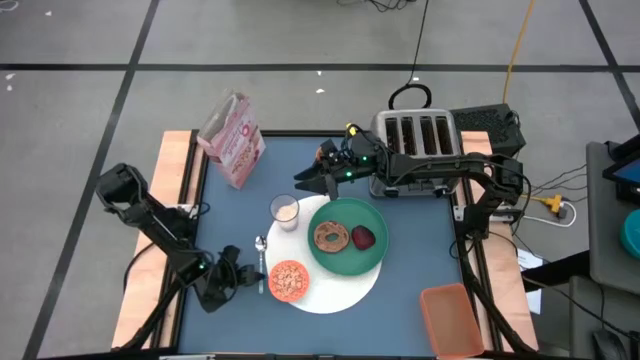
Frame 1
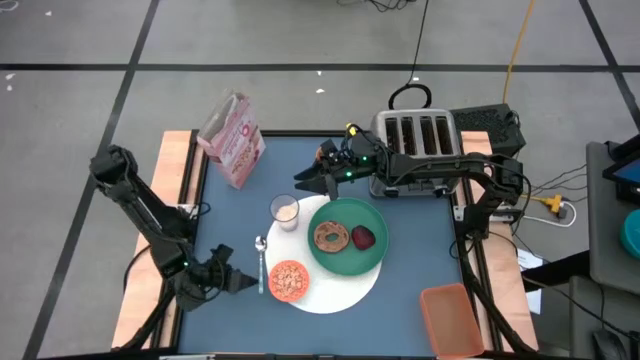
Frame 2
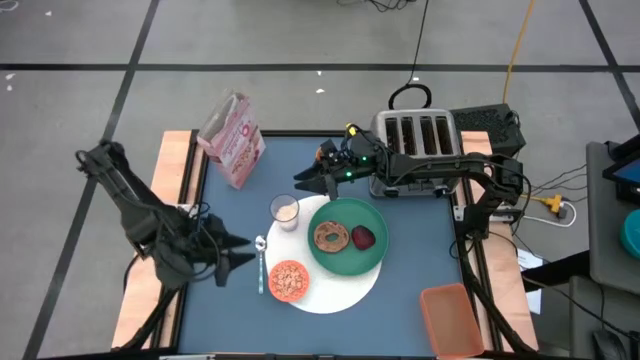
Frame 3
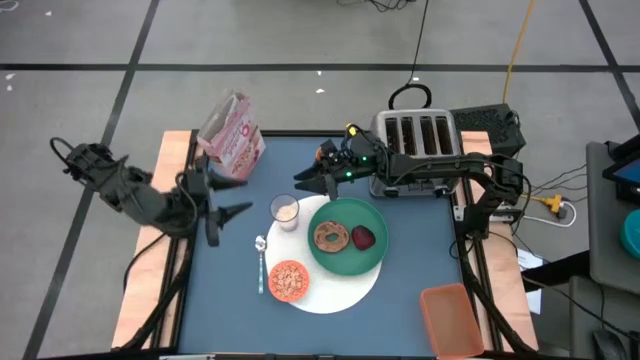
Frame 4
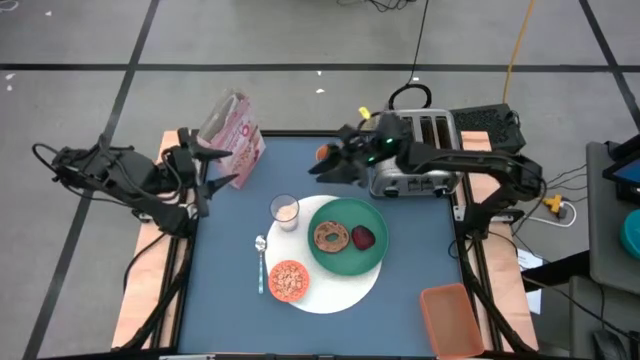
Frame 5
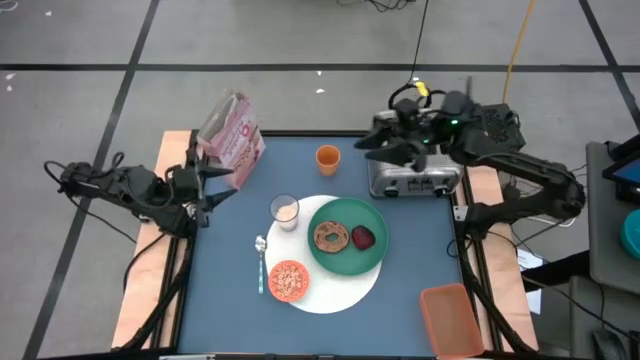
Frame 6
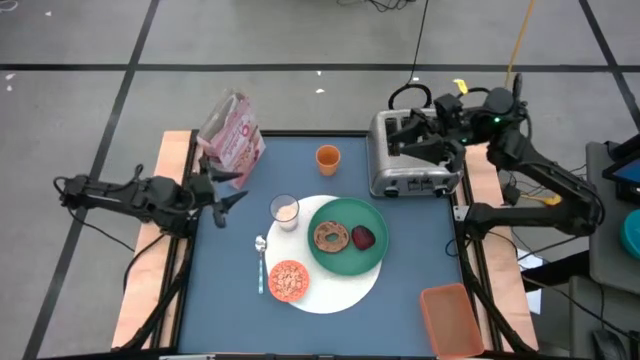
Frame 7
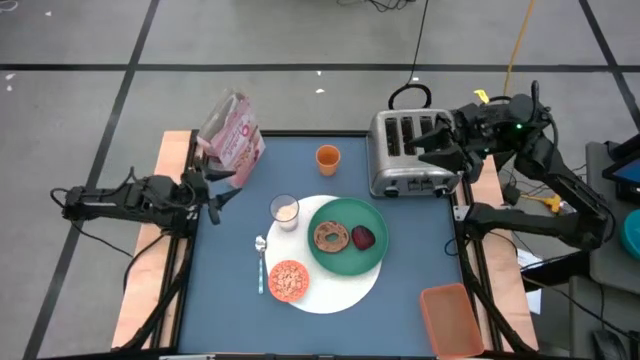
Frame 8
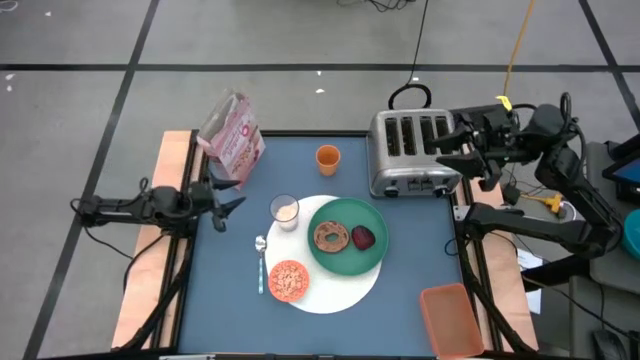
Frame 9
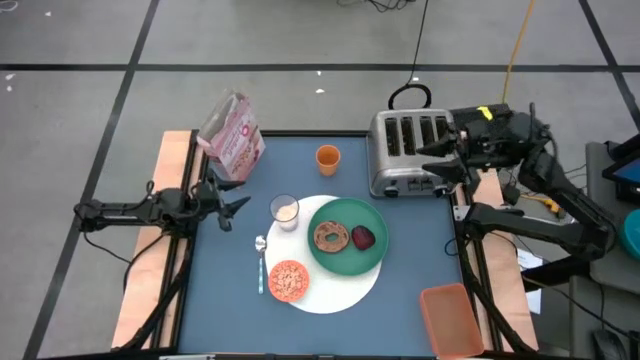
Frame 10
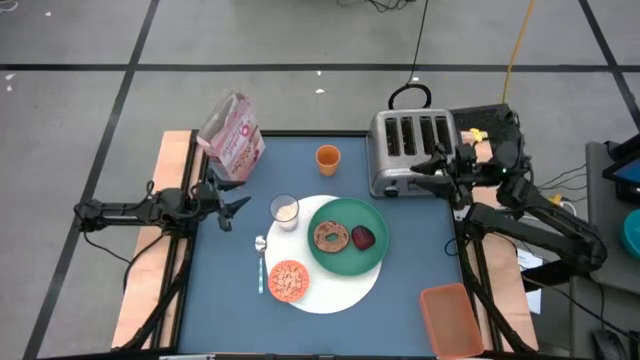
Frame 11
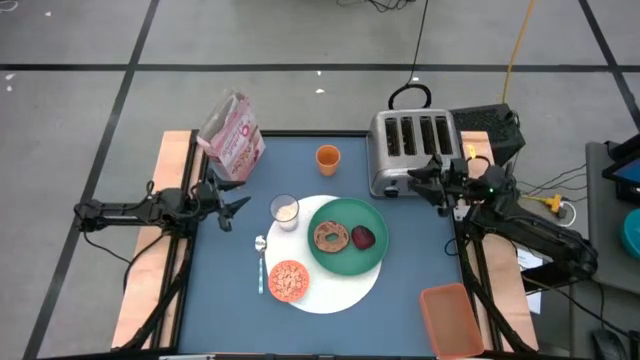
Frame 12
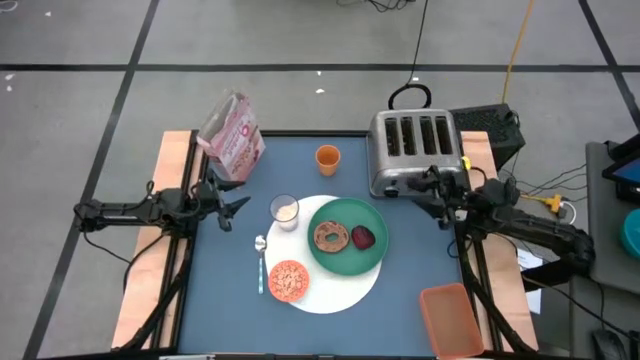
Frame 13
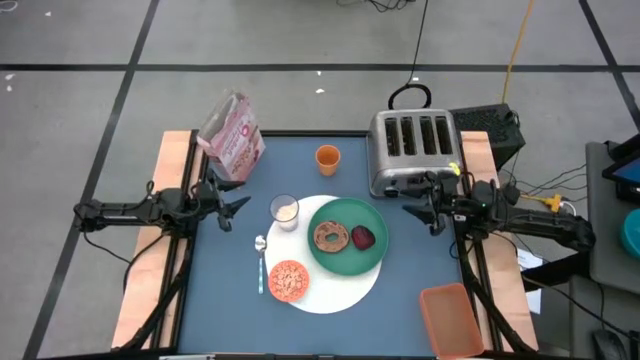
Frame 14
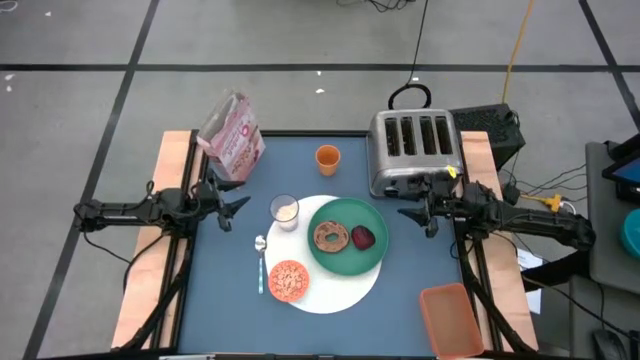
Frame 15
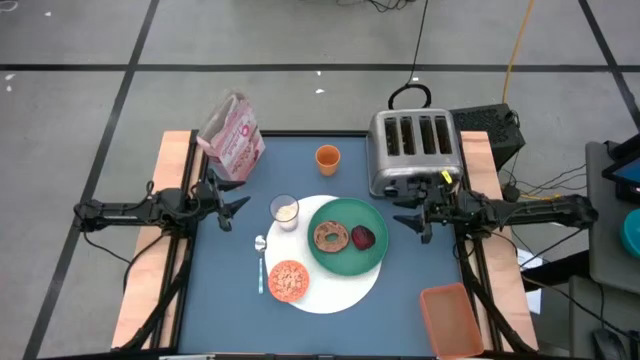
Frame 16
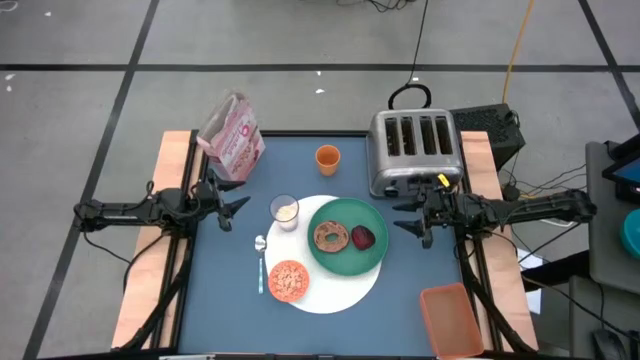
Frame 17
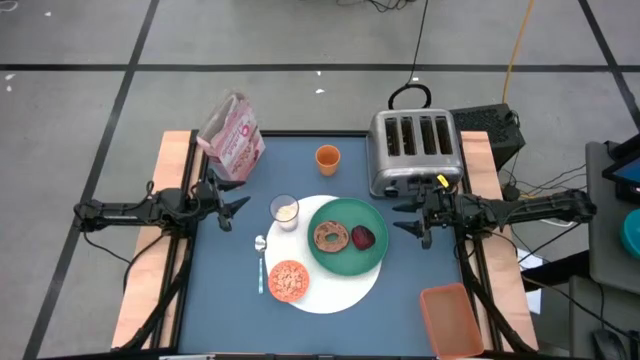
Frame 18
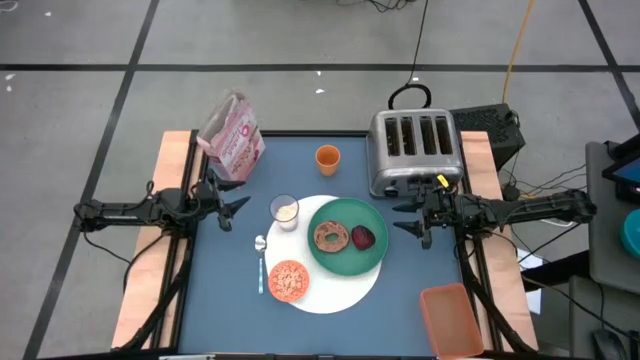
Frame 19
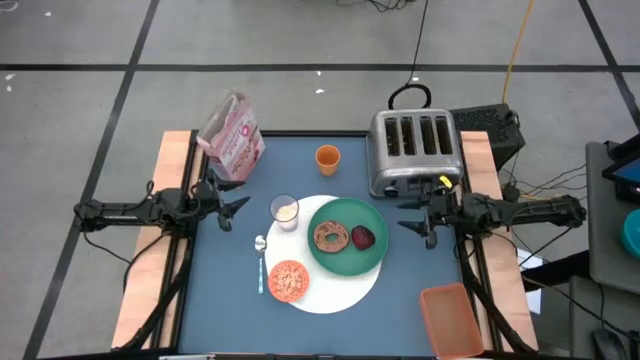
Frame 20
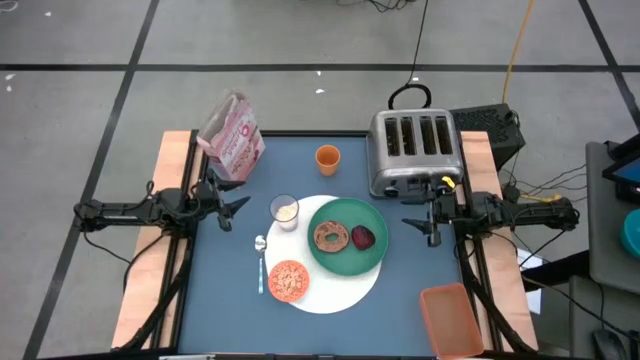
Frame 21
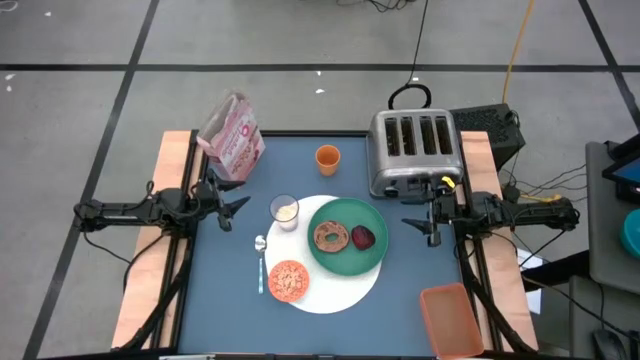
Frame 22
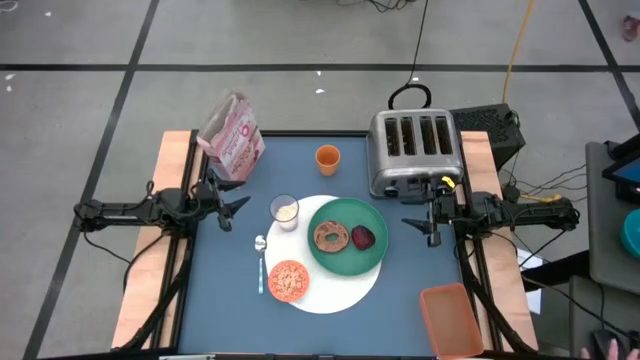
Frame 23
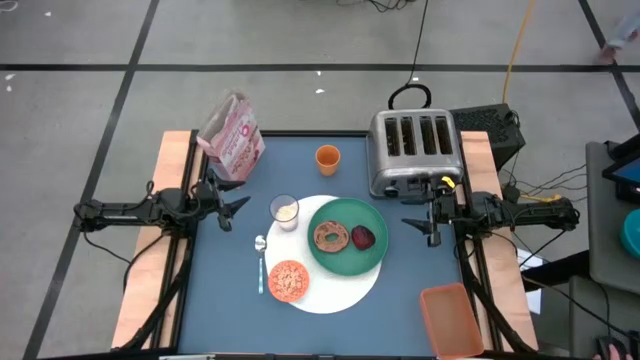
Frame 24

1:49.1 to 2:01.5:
Task: Arrange a breakfast setting
Return to Home Position

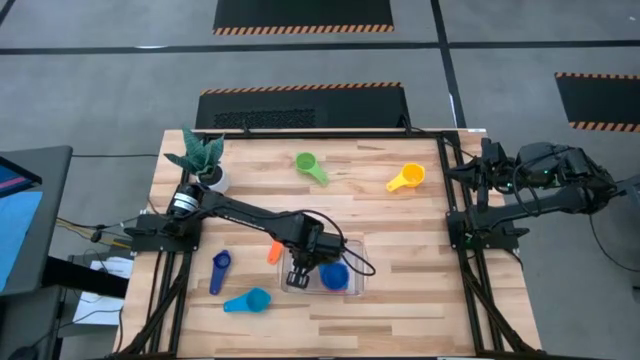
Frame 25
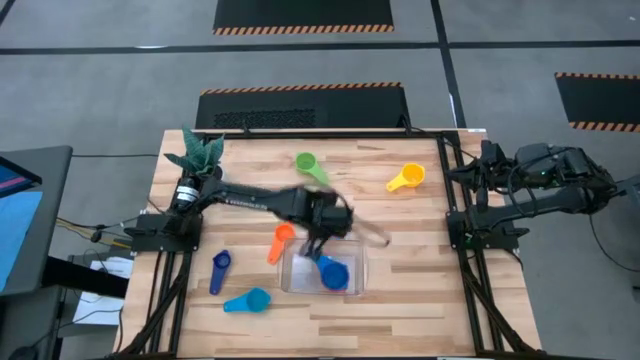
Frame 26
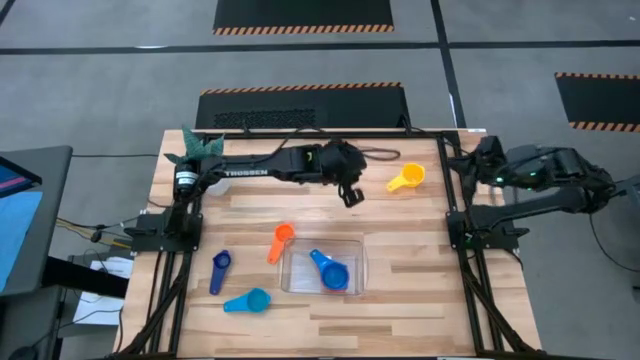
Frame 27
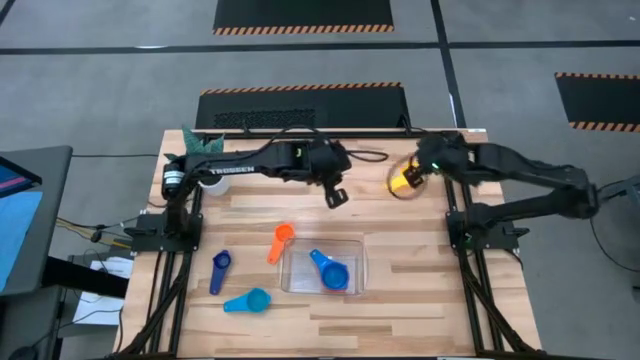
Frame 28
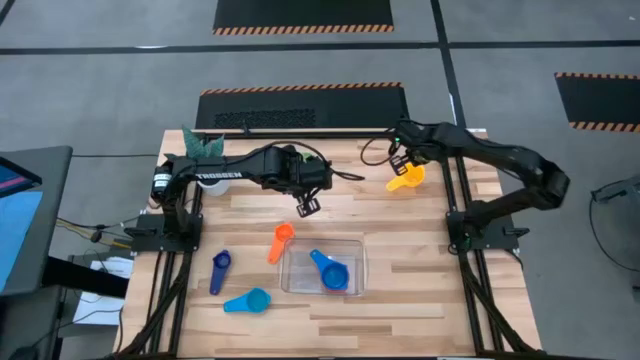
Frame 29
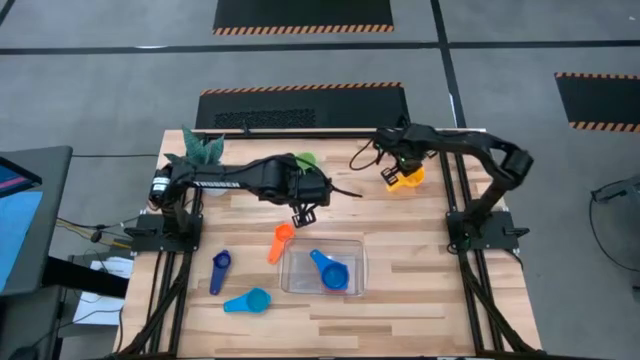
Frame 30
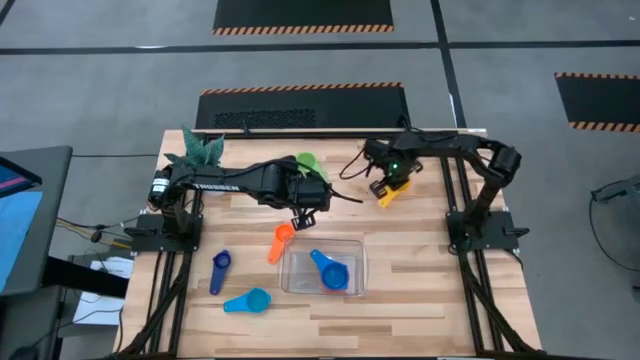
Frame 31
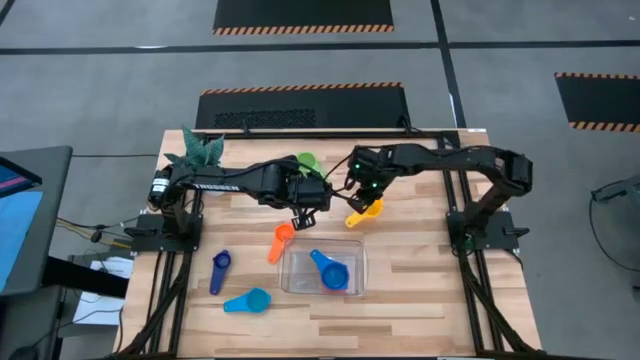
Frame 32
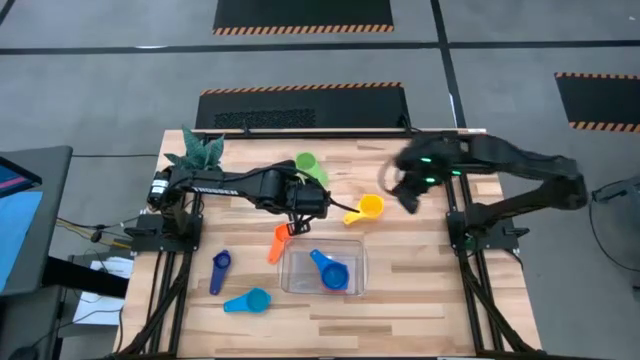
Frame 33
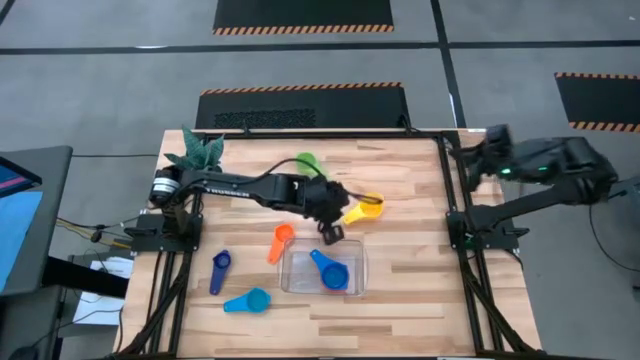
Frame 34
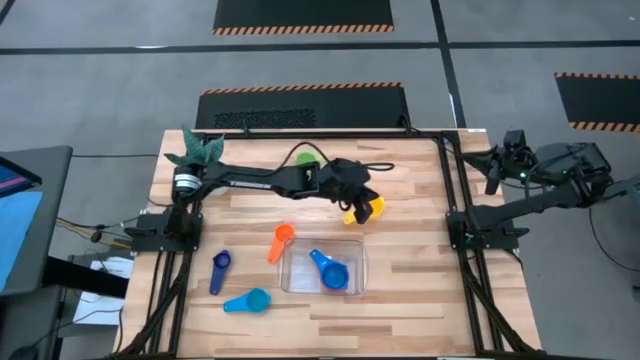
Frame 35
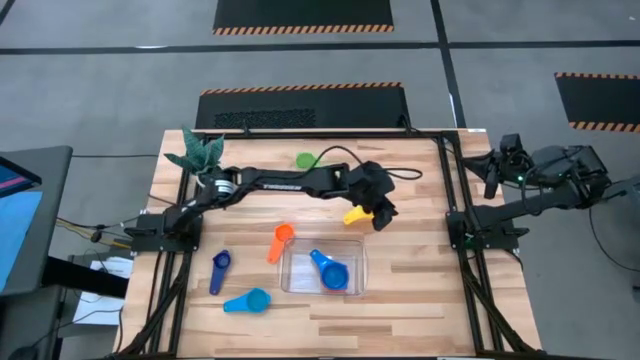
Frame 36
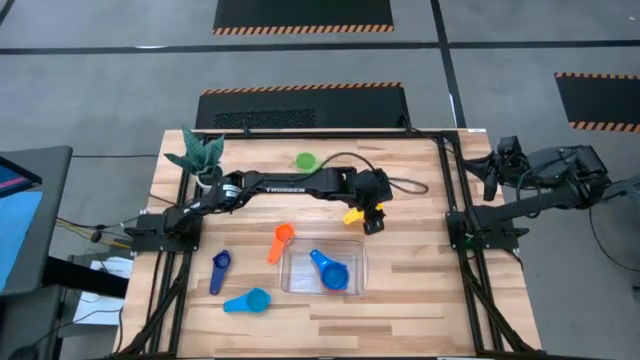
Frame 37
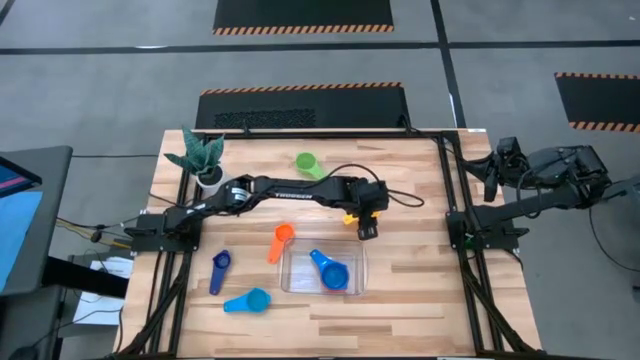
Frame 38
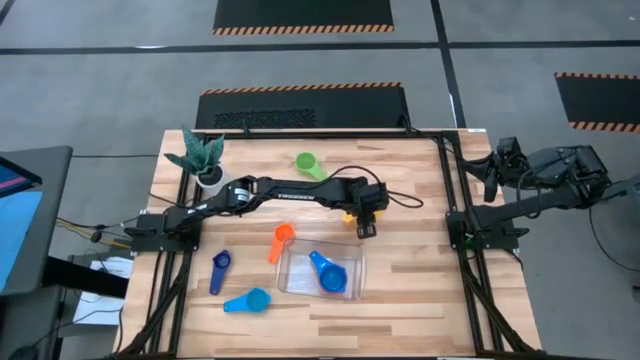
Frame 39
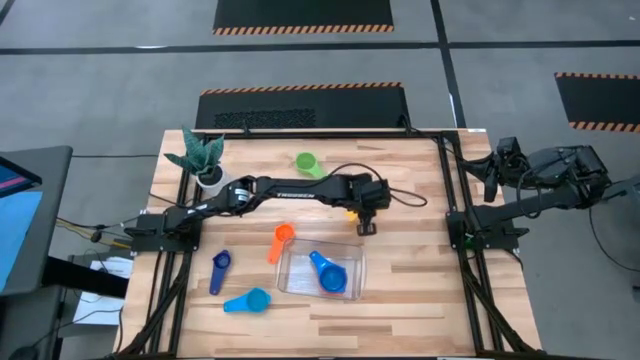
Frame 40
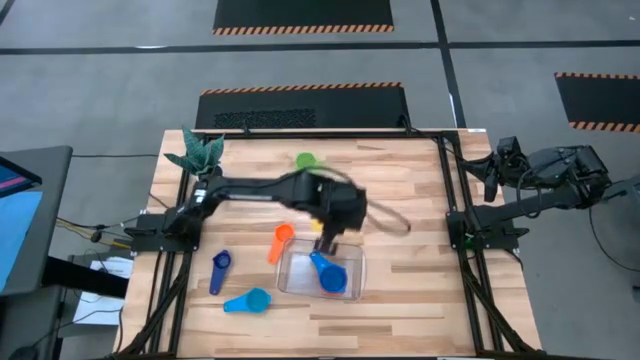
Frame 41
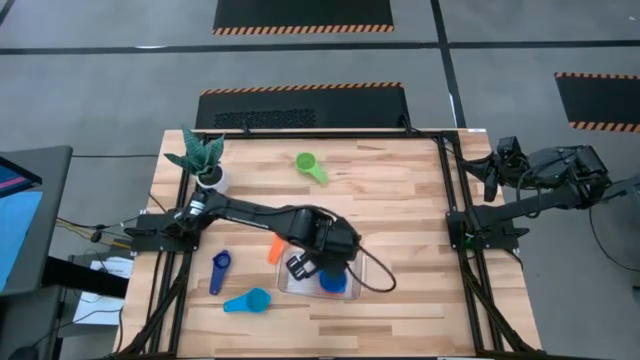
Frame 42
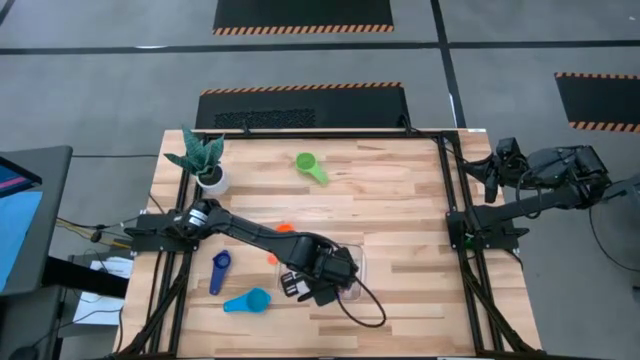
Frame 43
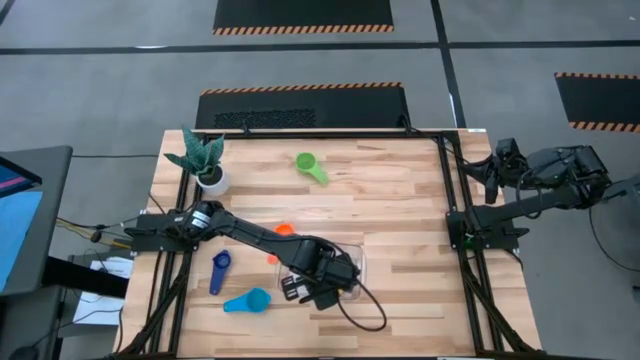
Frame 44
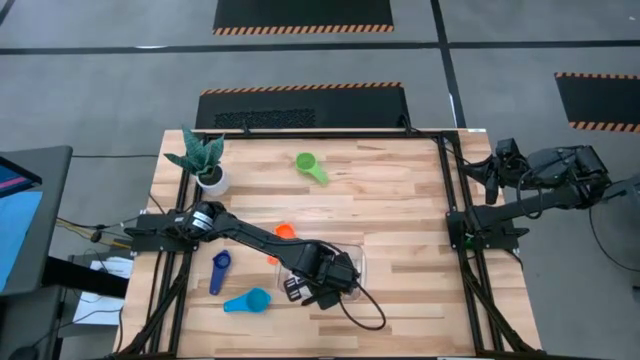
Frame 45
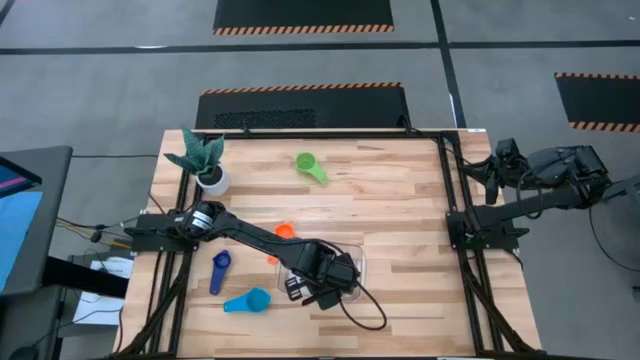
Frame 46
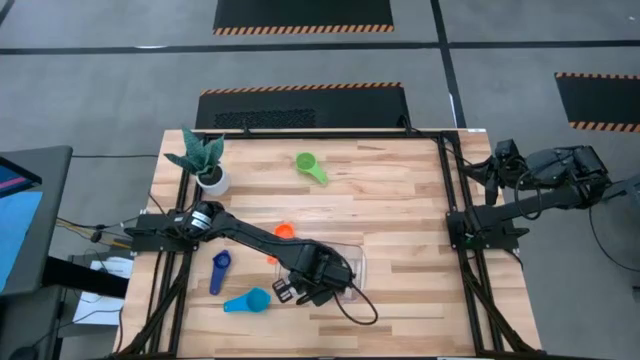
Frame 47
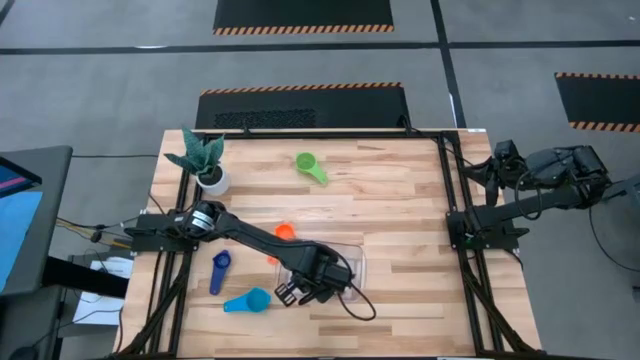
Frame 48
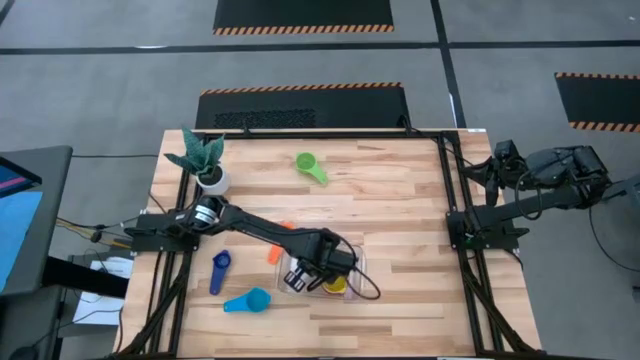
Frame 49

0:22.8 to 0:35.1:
Task: Nest measuring cups in basket
Stack the yellow measuring cup on top of the blue measuring cup in the transparent bin
